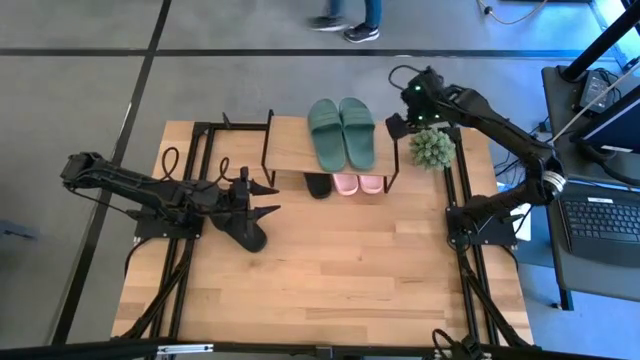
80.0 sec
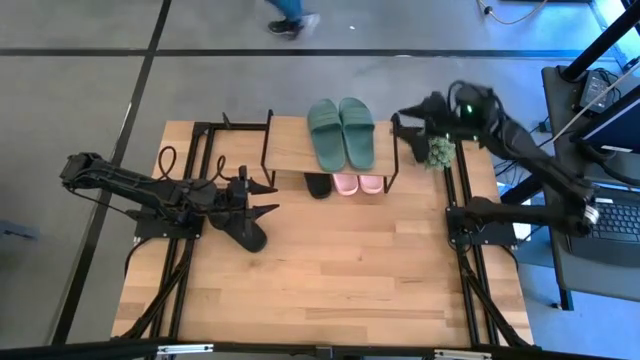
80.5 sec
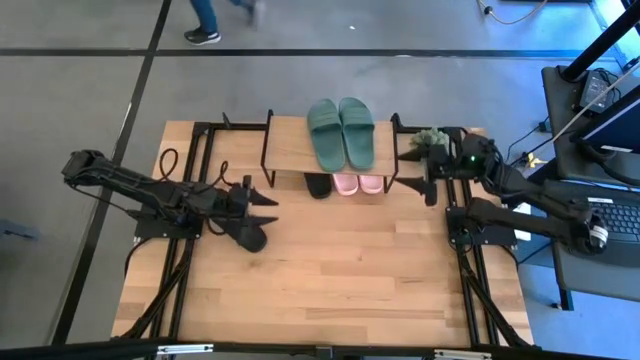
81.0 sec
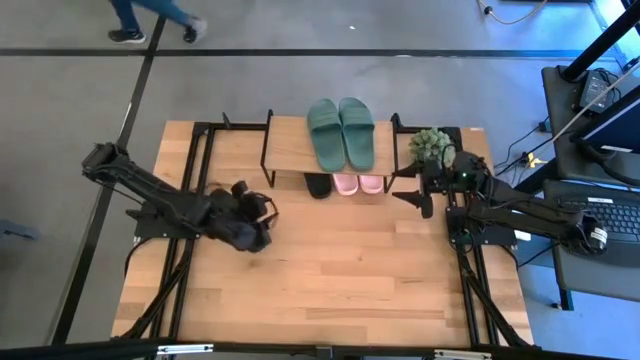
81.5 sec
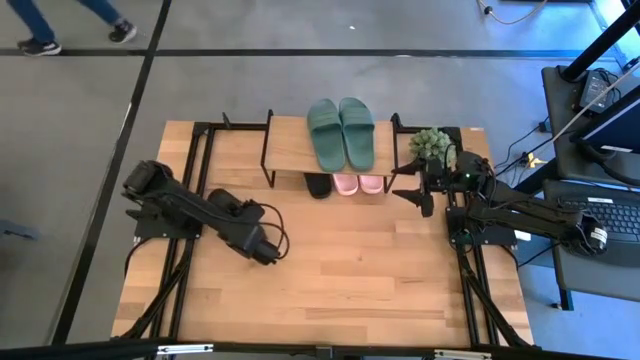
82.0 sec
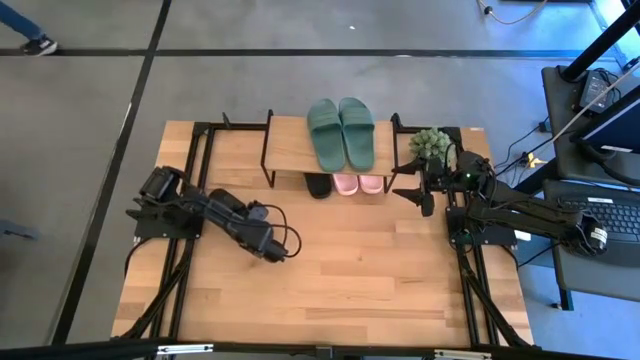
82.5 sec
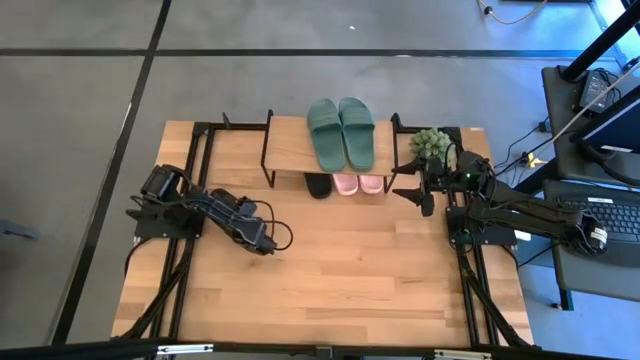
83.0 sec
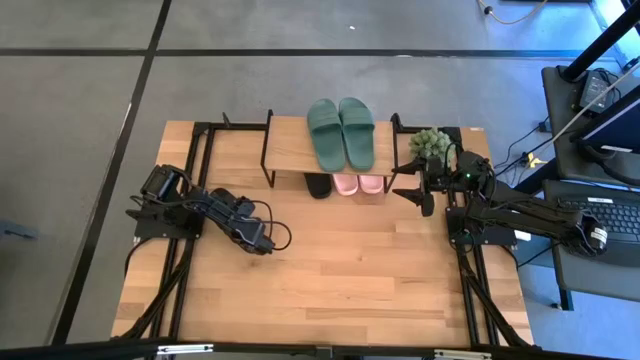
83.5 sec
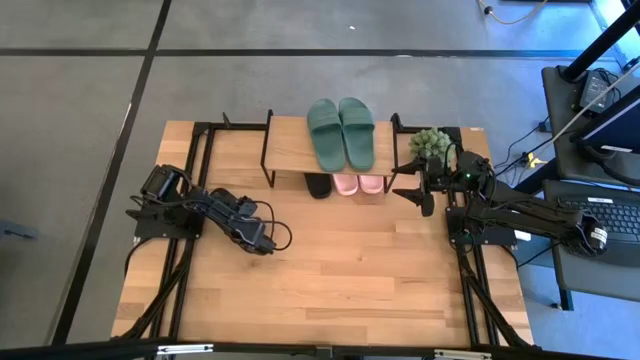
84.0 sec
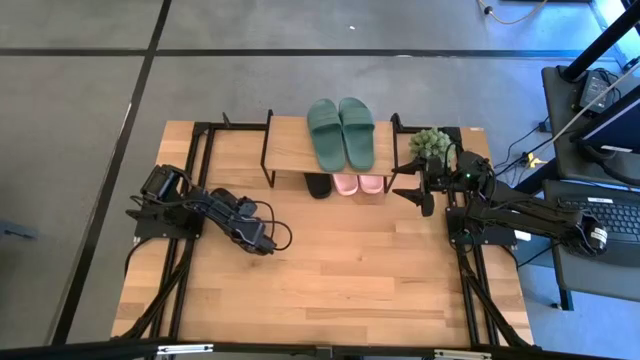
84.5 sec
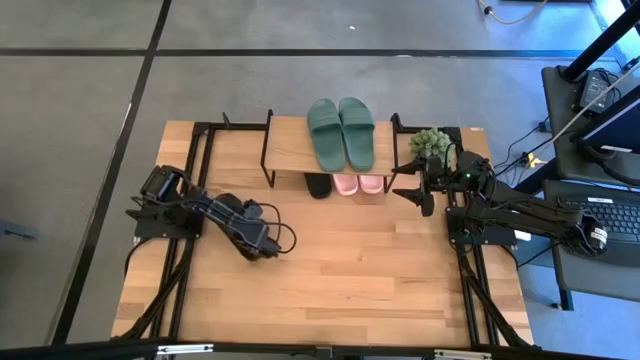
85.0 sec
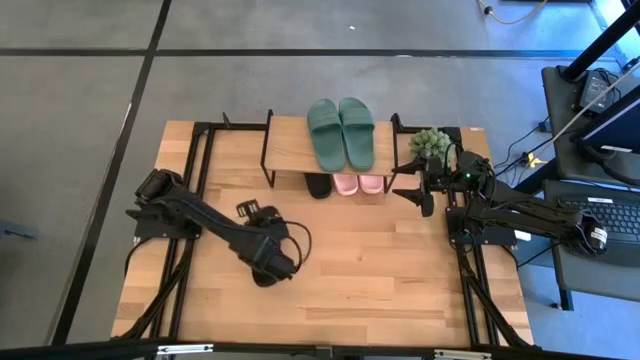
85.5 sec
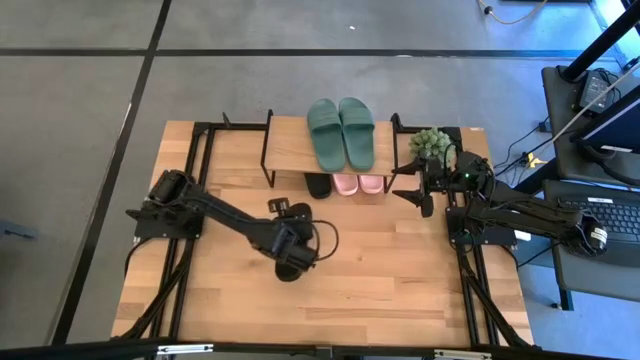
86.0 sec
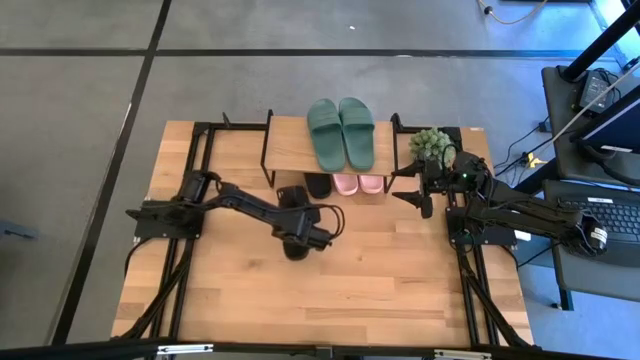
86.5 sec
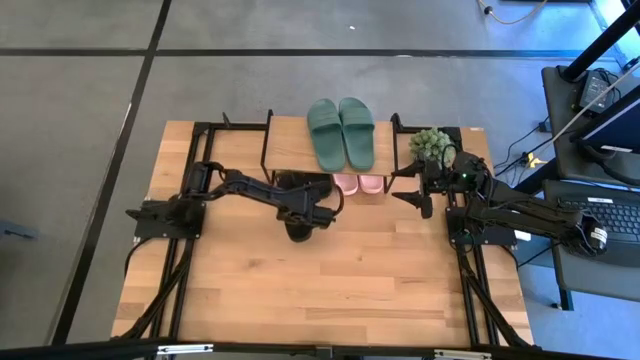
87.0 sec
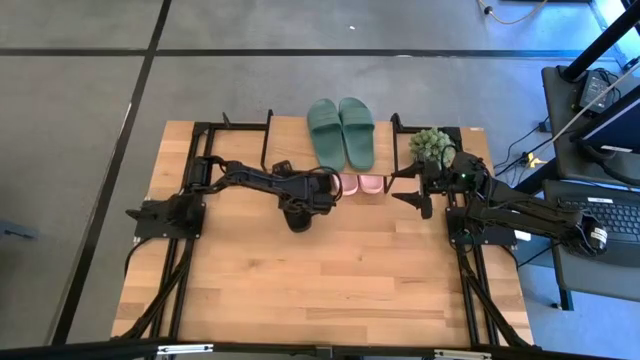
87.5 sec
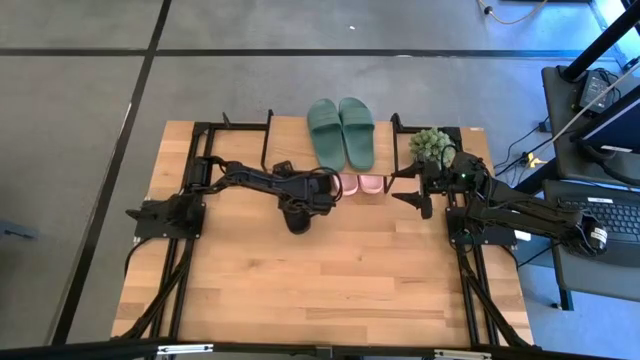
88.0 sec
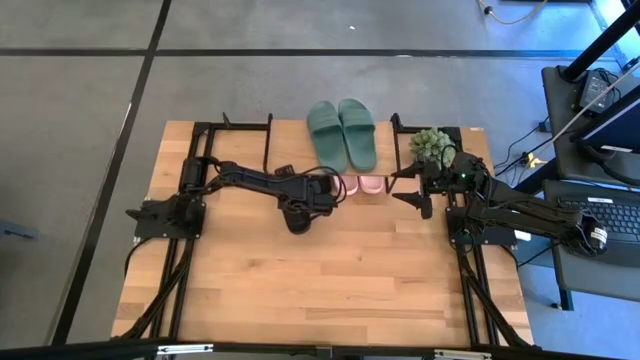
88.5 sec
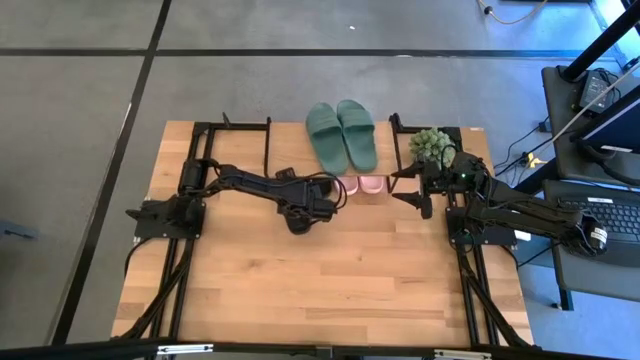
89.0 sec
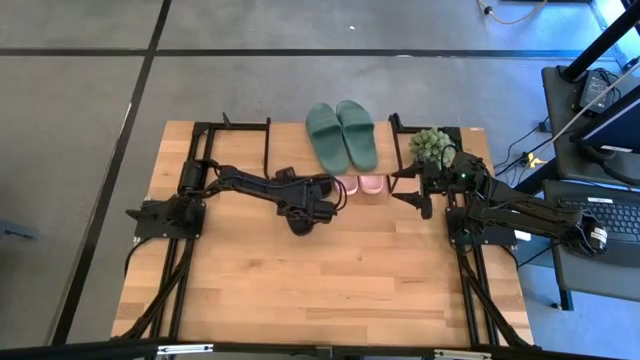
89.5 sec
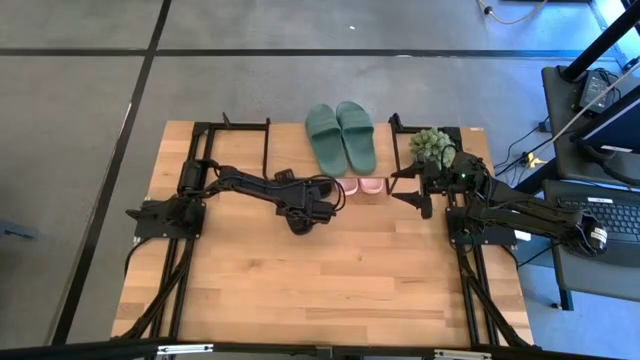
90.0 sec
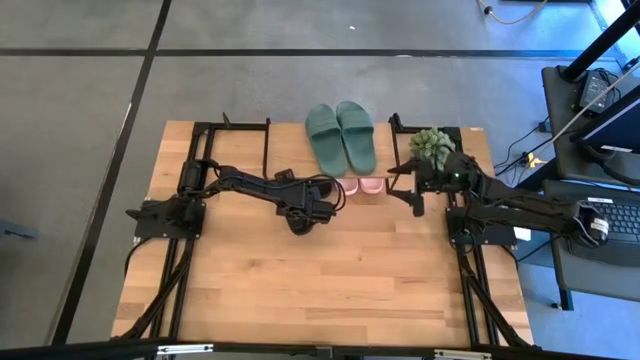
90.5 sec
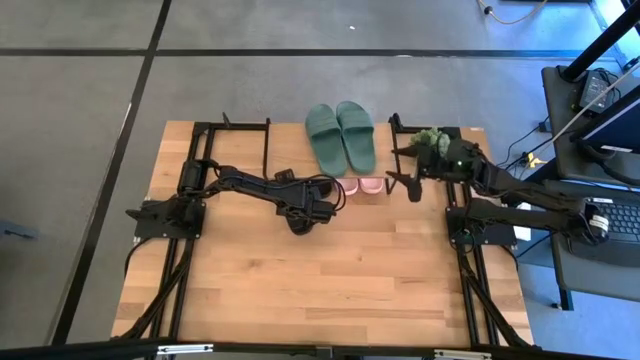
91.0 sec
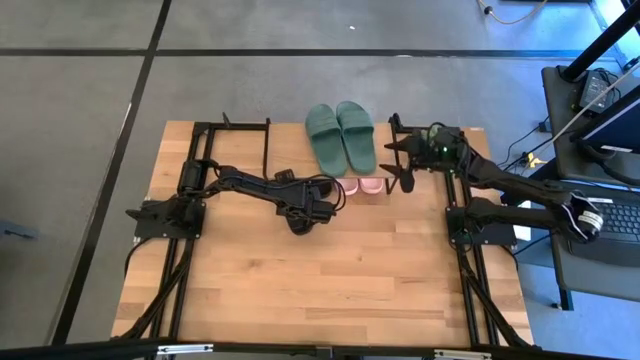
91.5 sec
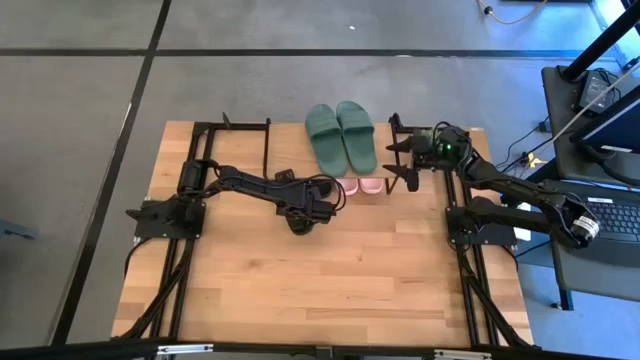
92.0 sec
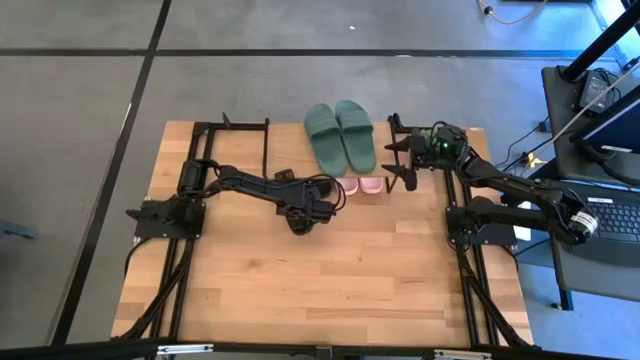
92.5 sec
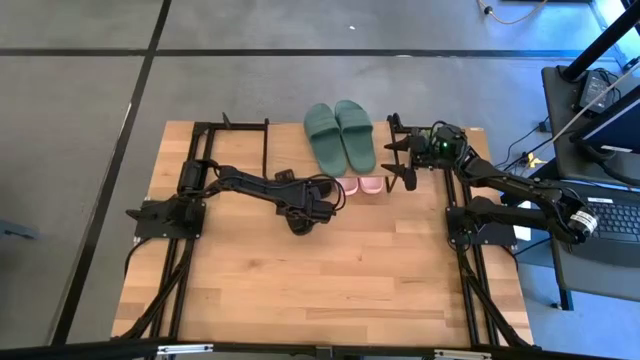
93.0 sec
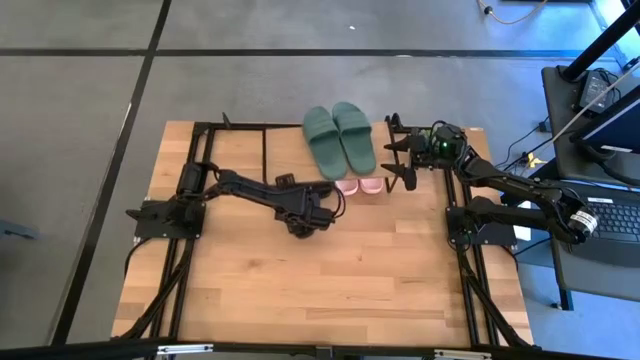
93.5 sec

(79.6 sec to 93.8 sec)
Task: Pick and place slides into the shelf
Put the black slide under the shelf
